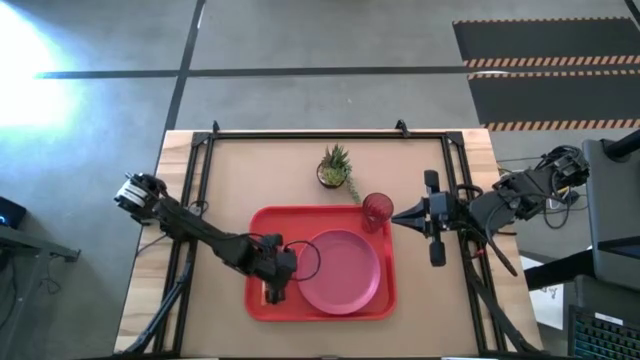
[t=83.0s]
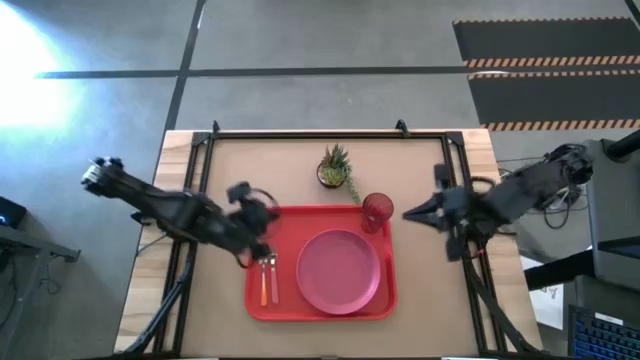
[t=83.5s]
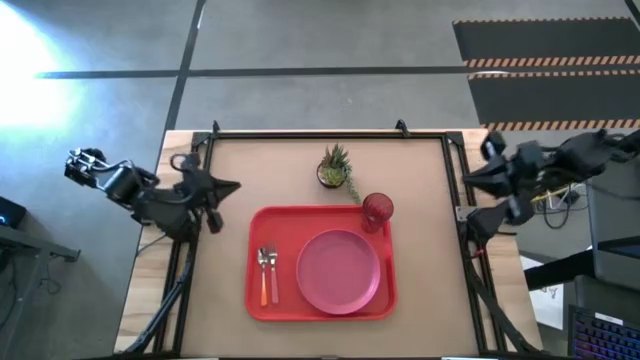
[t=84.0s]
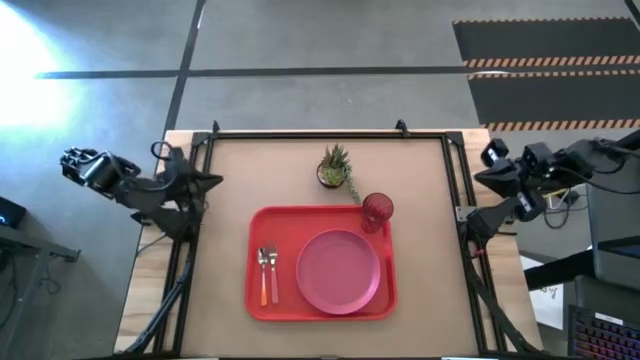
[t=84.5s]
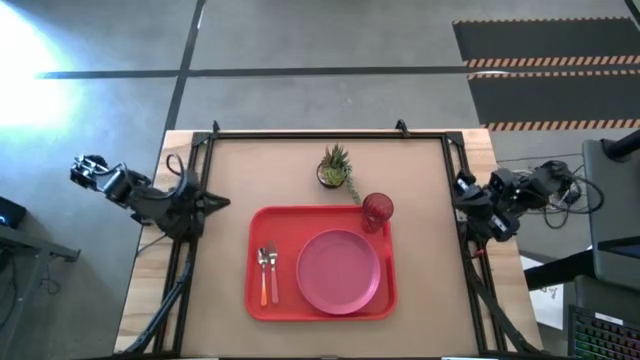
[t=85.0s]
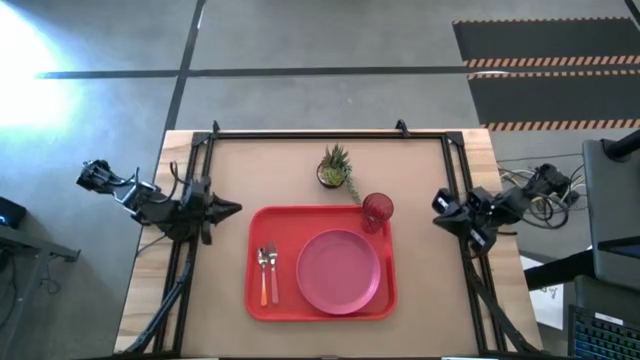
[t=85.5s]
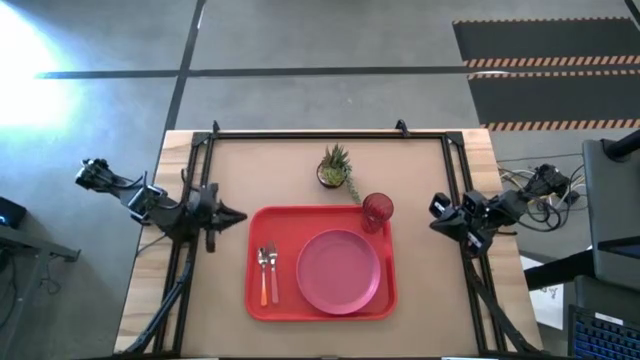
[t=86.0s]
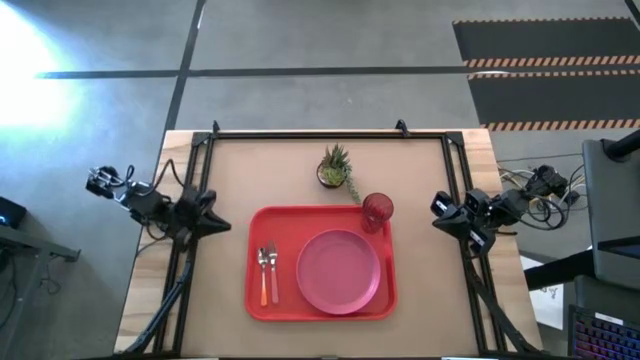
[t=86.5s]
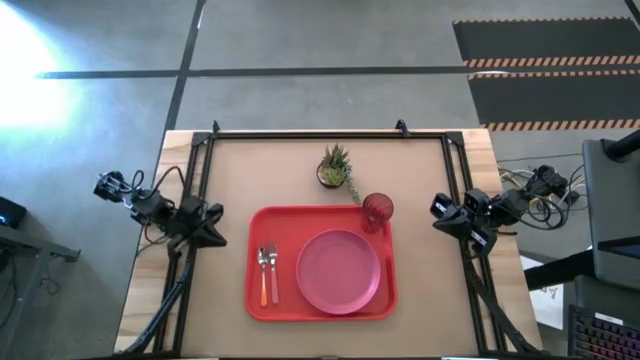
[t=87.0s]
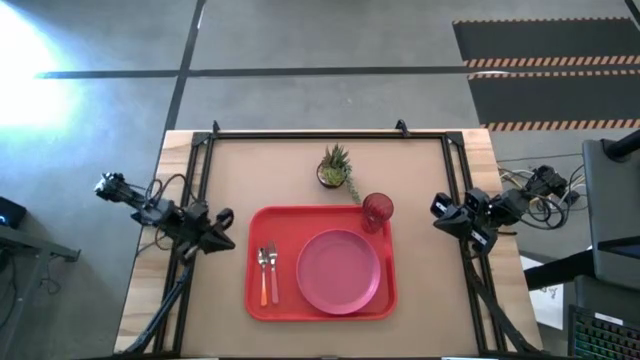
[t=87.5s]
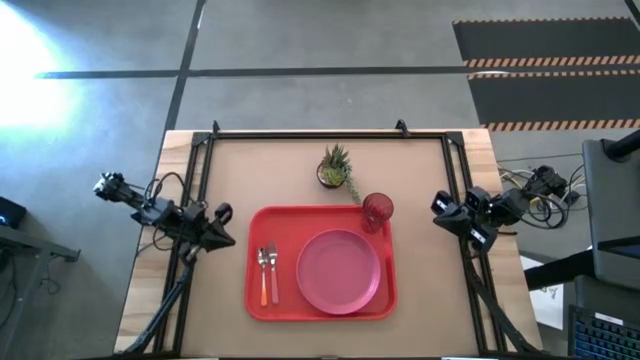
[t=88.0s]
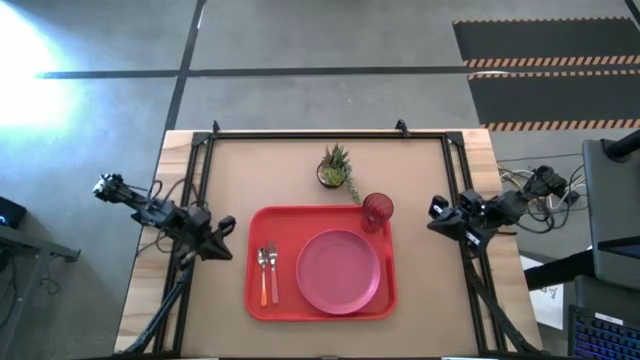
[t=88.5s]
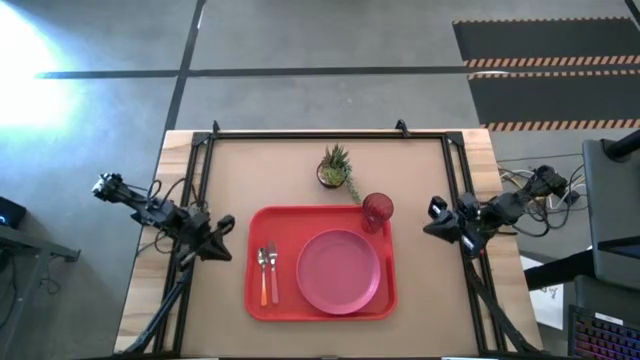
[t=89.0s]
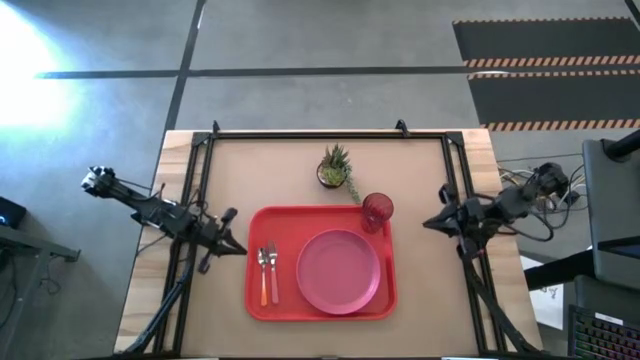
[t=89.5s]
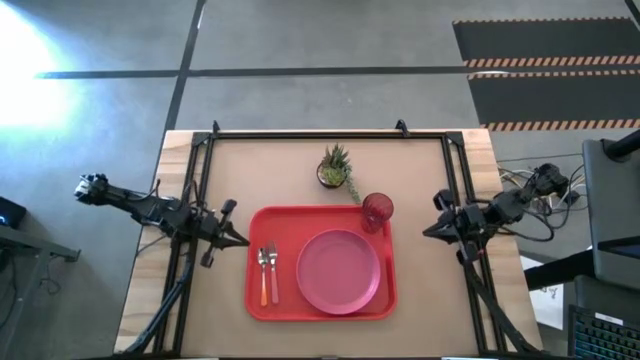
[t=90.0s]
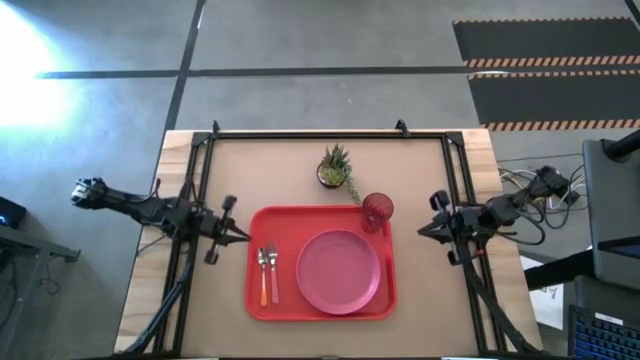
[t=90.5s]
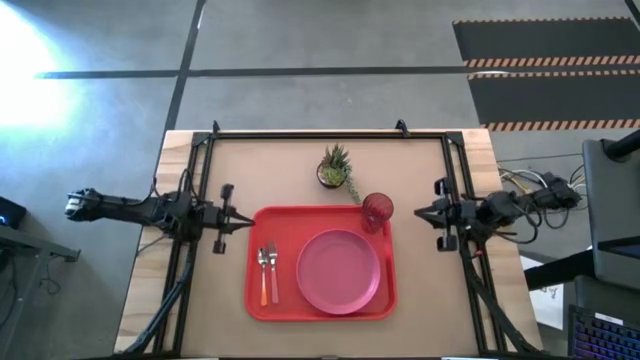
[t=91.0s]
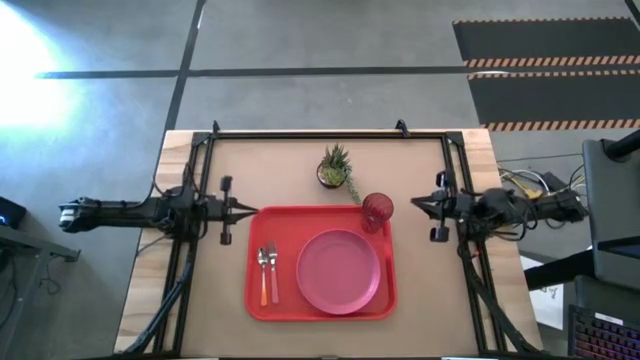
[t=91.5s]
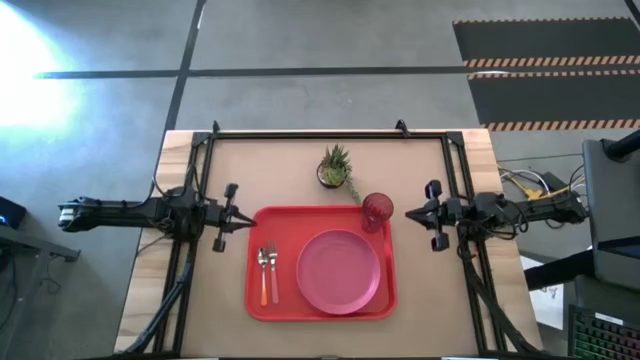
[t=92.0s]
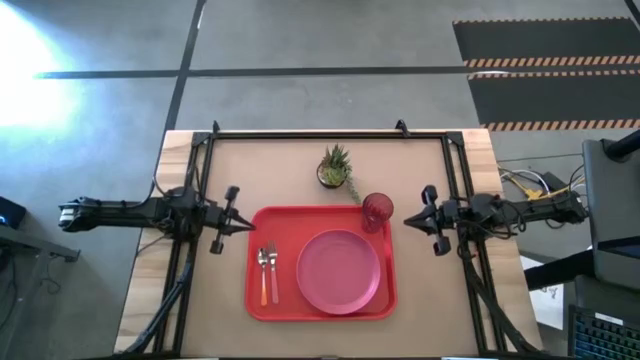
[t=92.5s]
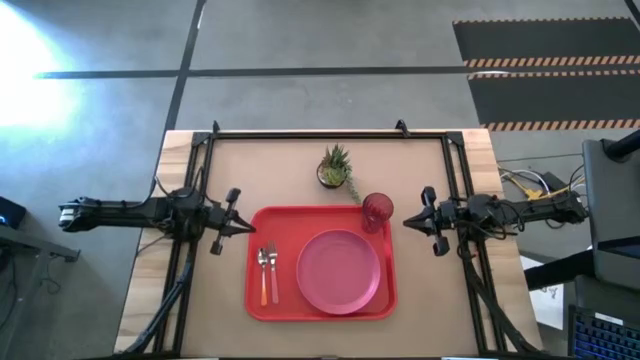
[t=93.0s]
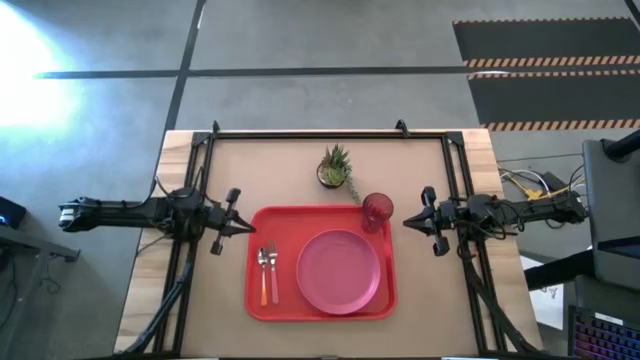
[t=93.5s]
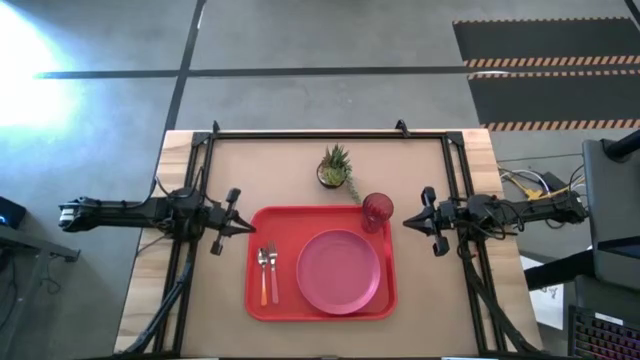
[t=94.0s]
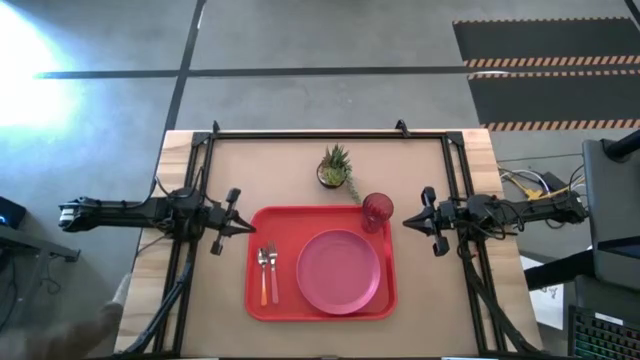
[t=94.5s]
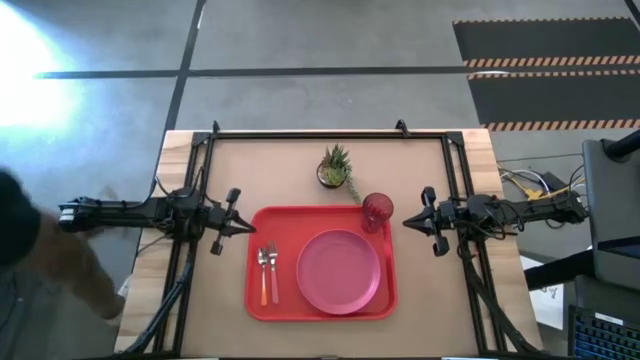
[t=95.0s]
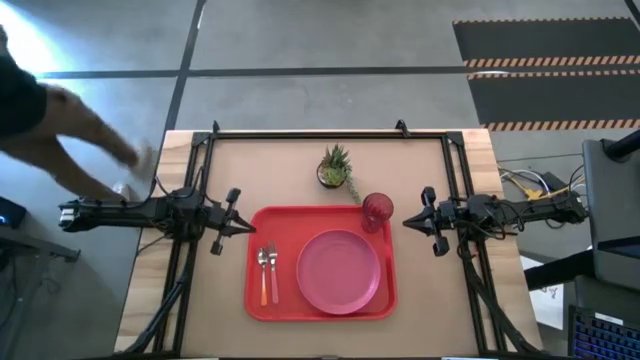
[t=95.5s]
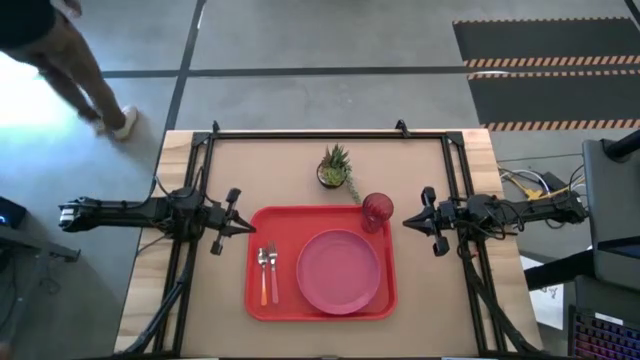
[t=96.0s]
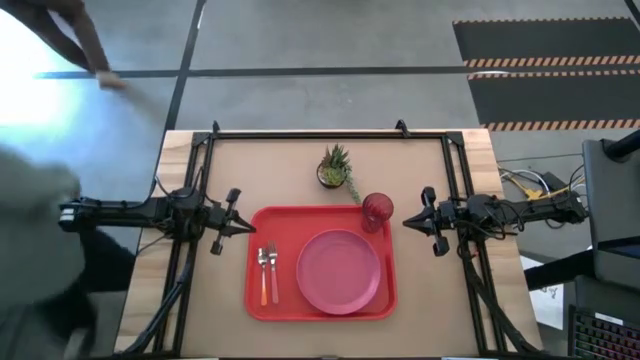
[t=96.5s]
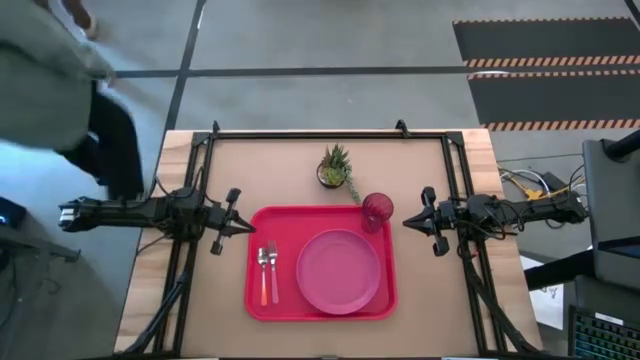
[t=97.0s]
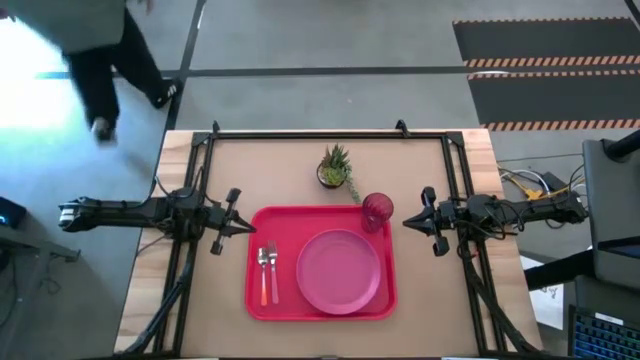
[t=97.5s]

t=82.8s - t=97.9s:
Task: Pick and place plate/cup/fork/spoon on tray
Return to Home Position

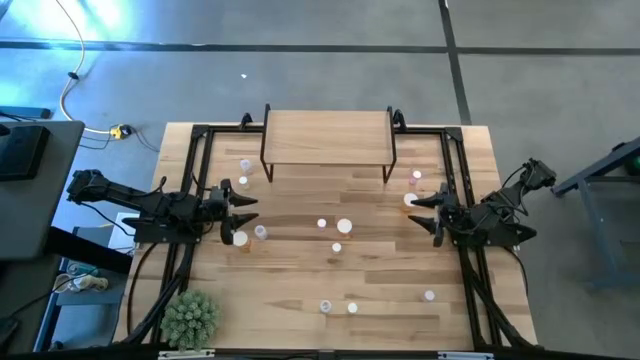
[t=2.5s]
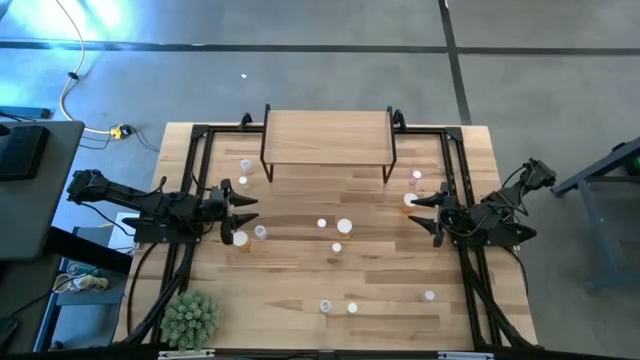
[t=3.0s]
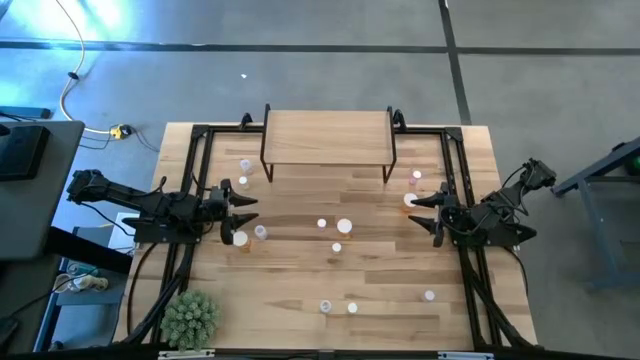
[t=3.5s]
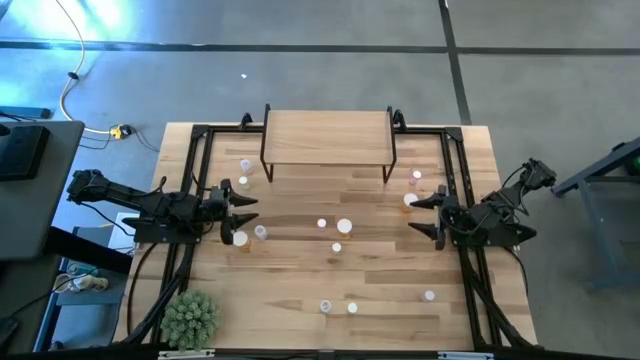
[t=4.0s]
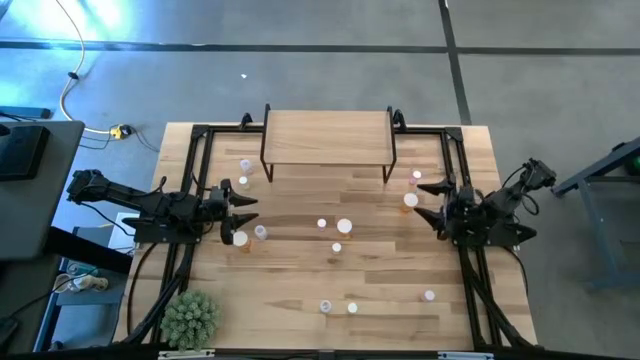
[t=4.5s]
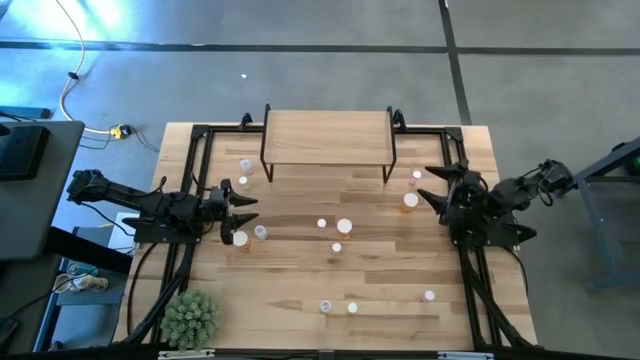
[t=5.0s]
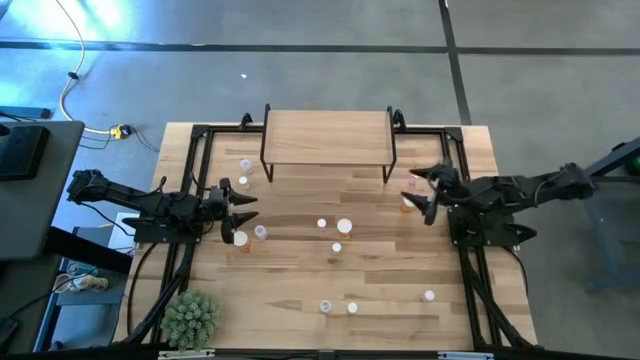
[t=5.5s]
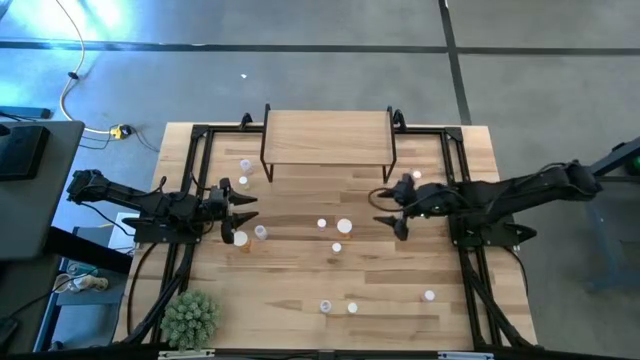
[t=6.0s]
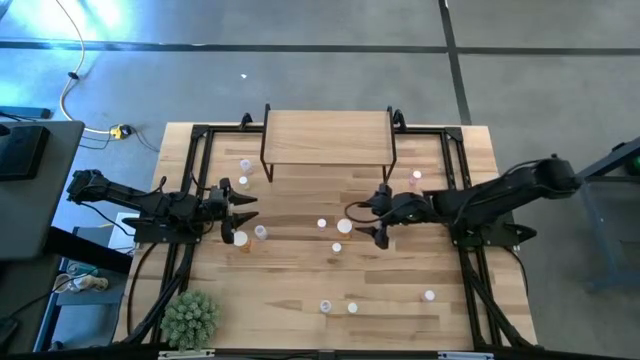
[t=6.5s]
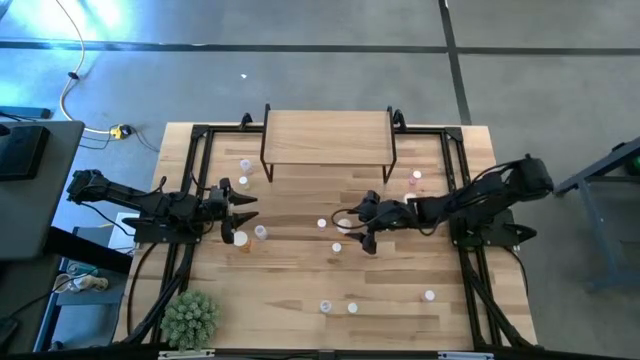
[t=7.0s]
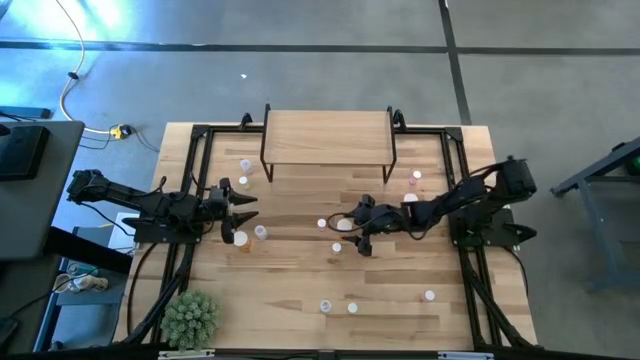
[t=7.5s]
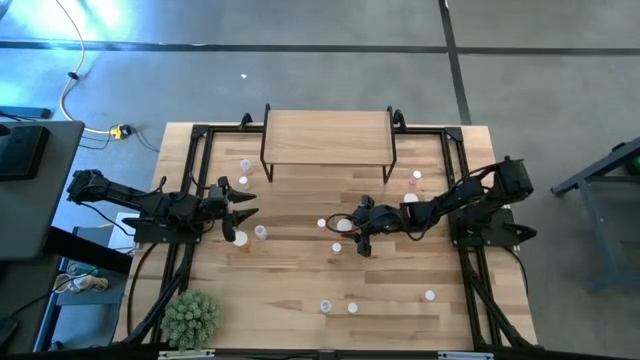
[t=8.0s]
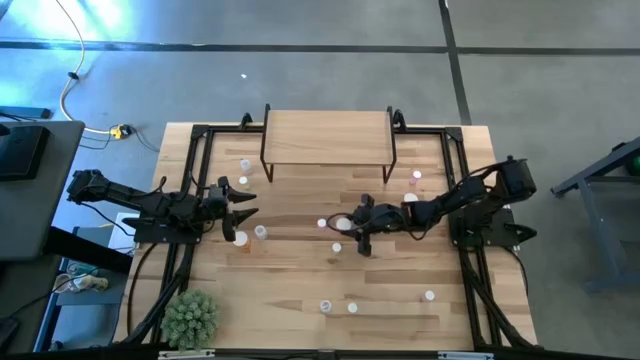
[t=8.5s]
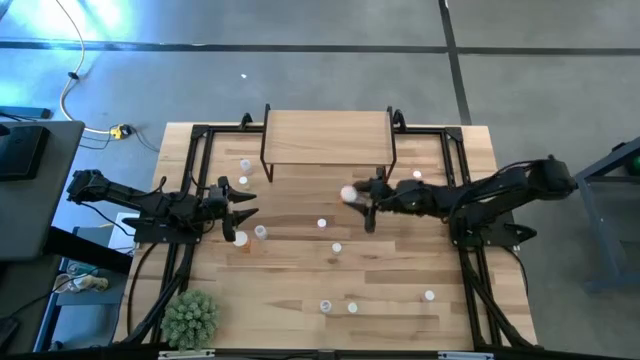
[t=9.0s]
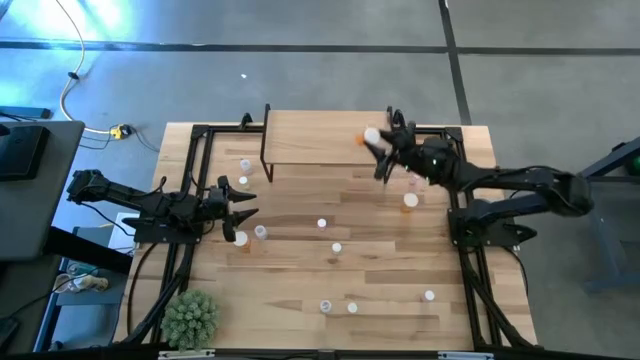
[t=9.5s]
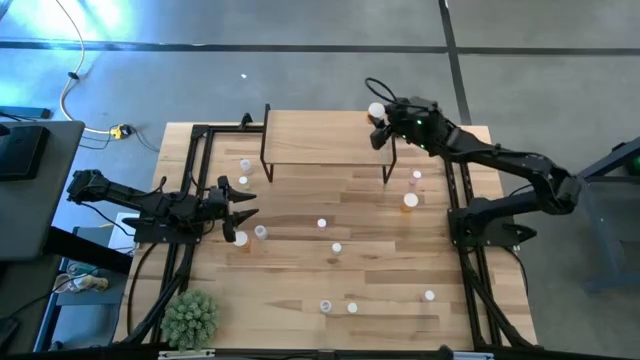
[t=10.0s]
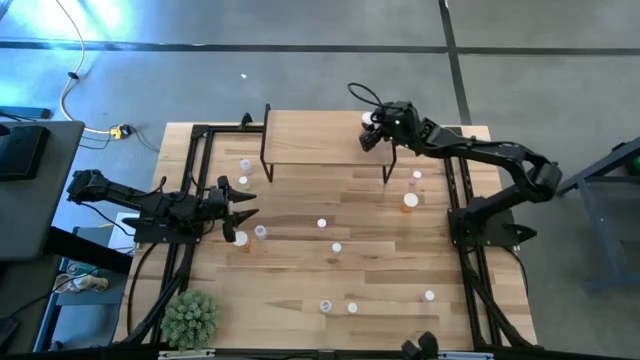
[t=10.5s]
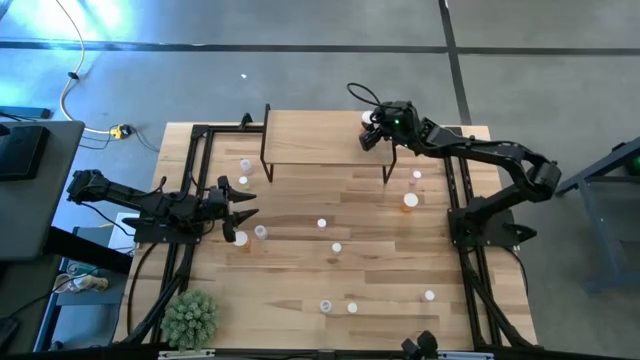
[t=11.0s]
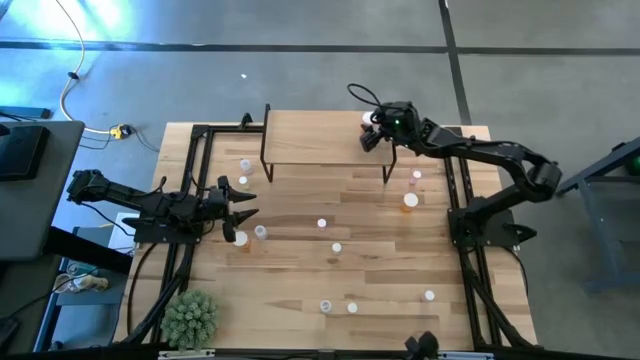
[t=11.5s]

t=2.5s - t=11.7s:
Task: Pick and place medicine bottles onto shelf by color
Put the middle orange pill bottle on the shelf
